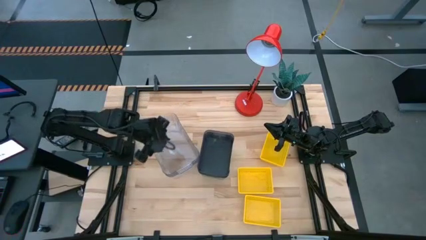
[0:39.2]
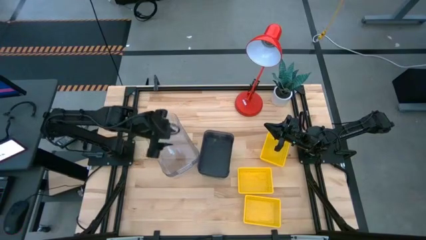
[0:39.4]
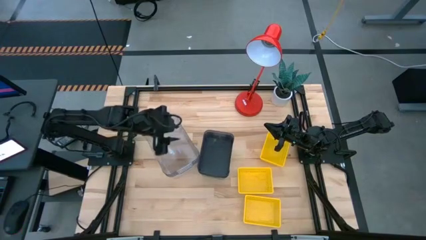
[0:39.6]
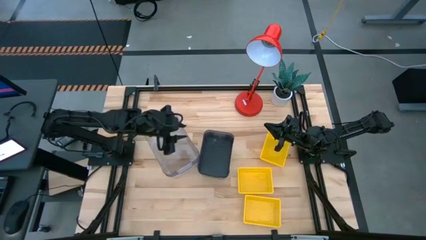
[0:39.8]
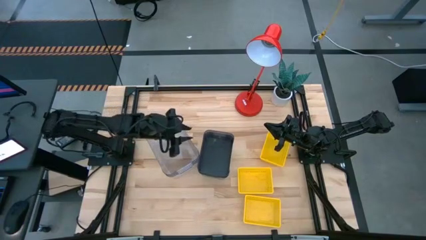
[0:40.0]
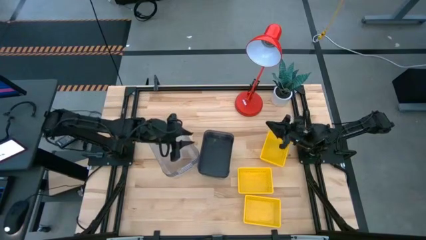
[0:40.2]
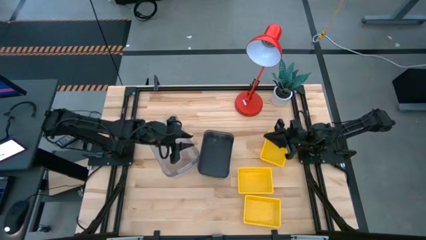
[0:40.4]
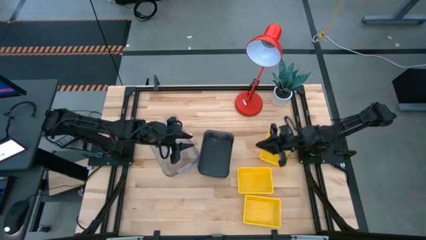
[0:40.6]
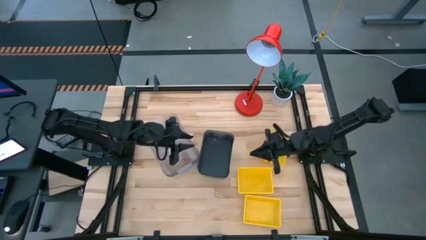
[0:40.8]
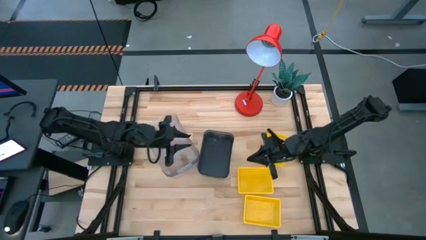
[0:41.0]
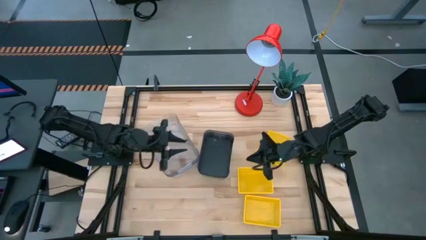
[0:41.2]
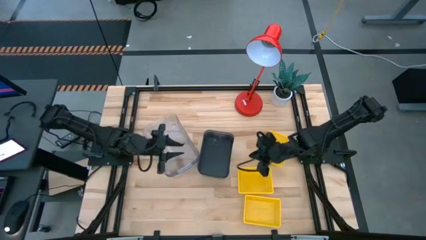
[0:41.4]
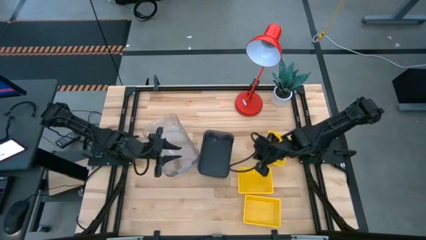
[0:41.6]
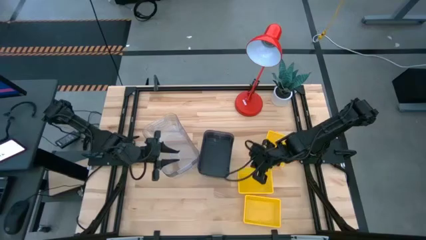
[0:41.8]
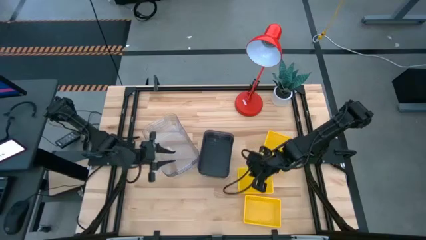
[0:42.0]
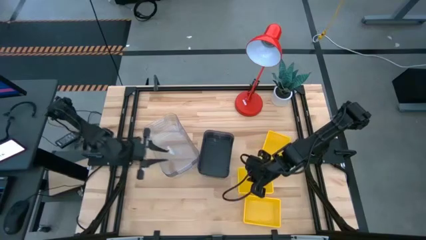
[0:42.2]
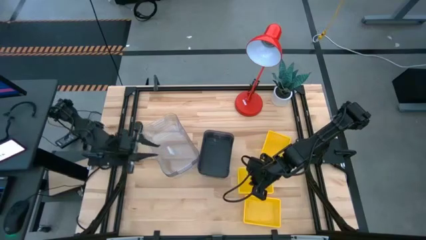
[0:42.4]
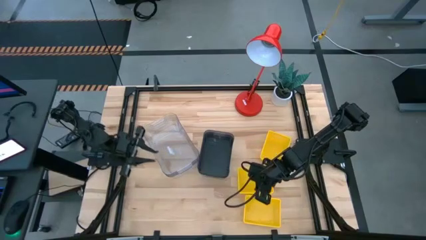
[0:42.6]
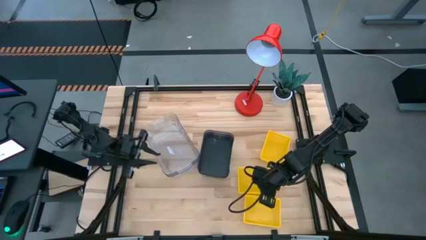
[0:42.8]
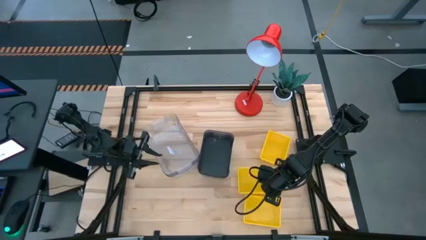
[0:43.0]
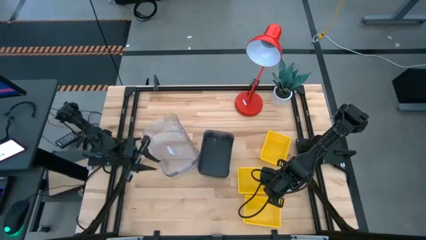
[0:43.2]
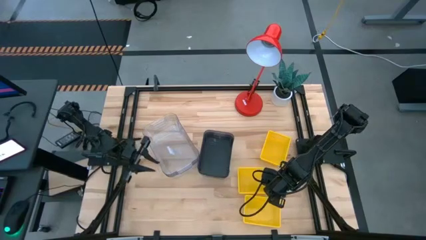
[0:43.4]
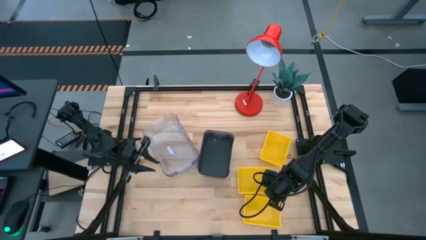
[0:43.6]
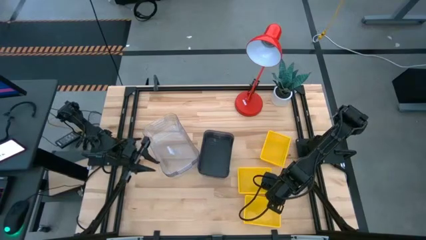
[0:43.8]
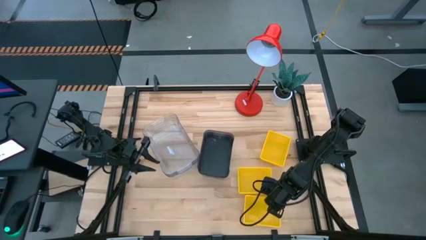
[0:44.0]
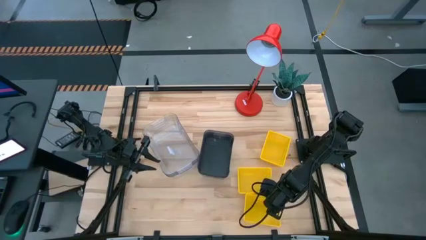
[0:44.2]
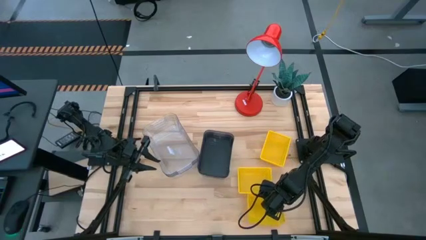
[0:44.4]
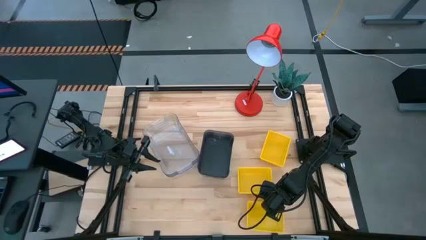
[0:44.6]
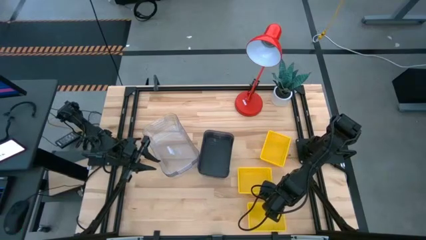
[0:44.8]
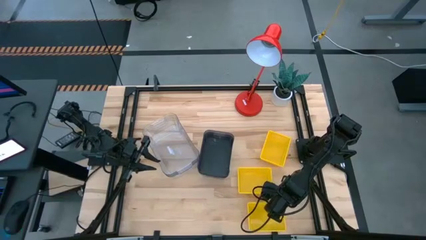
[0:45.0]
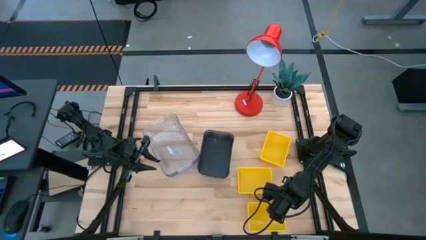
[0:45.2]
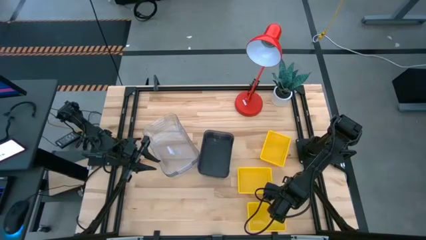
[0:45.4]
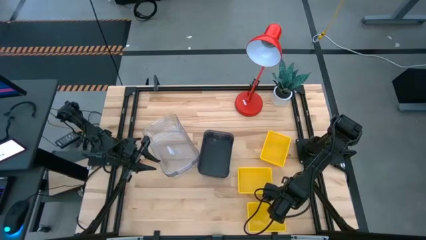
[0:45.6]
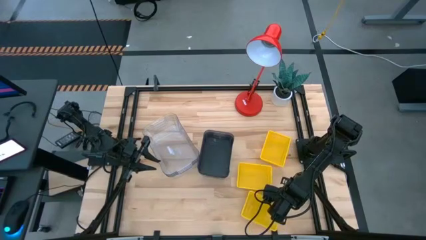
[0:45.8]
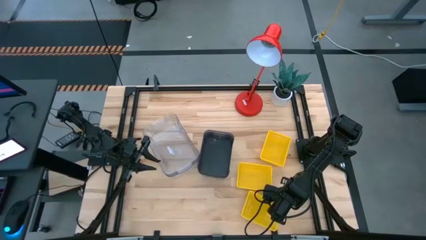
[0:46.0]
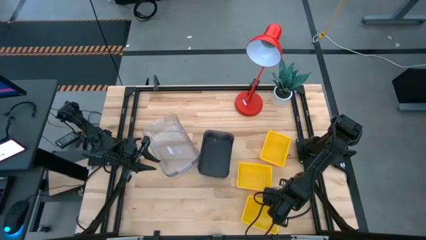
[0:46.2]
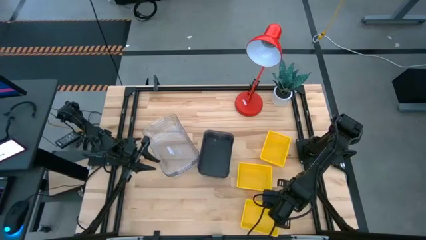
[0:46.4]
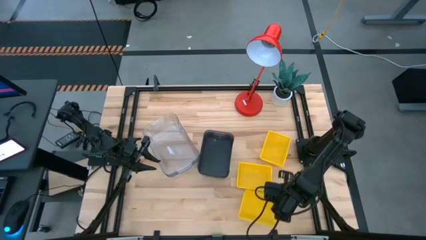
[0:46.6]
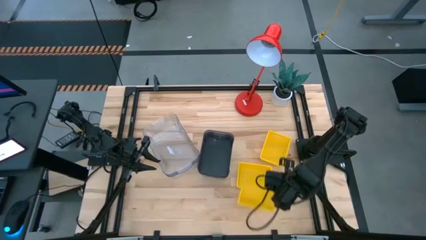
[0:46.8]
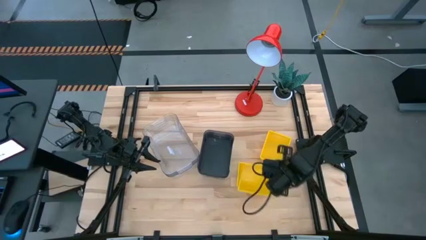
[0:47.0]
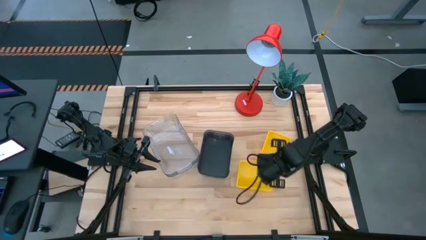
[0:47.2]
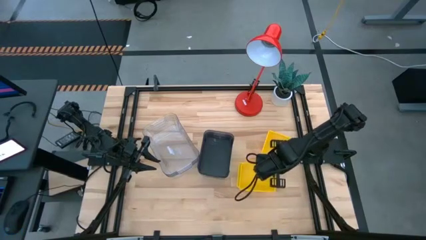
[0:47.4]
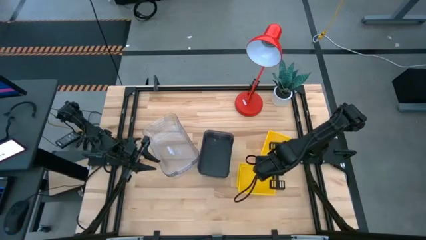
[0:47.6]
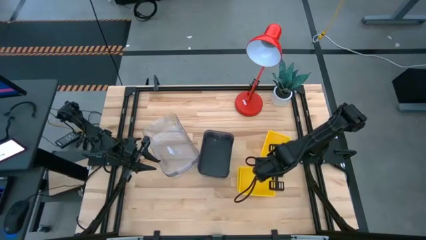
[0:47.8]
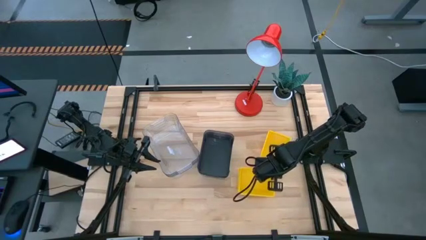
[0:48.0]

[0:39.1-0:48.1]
Stack the bottom yellow bin on the center yellow bin

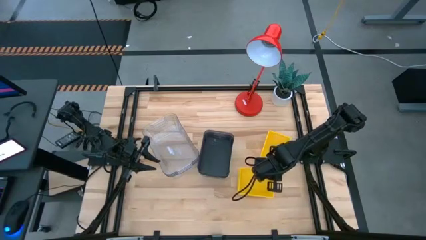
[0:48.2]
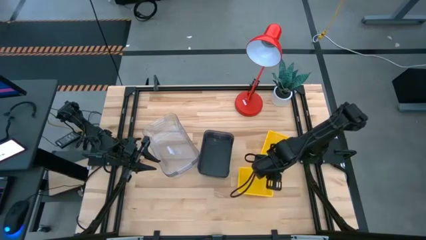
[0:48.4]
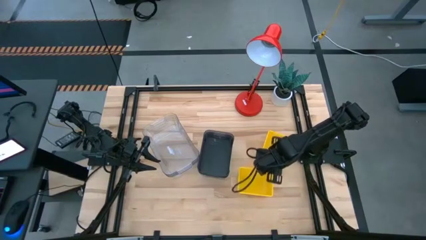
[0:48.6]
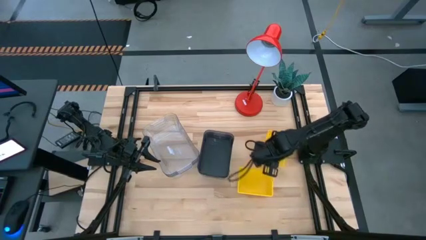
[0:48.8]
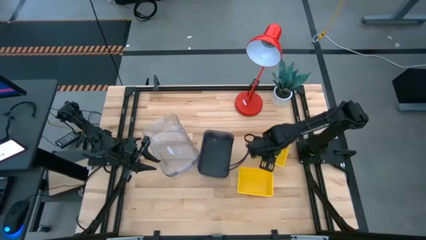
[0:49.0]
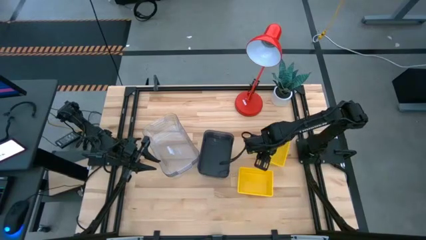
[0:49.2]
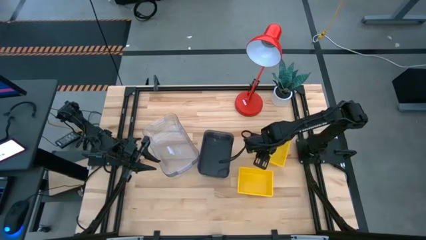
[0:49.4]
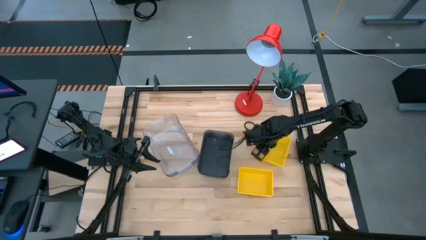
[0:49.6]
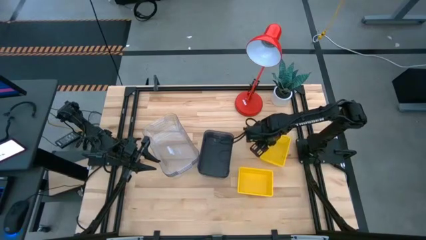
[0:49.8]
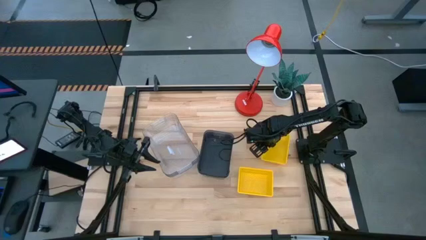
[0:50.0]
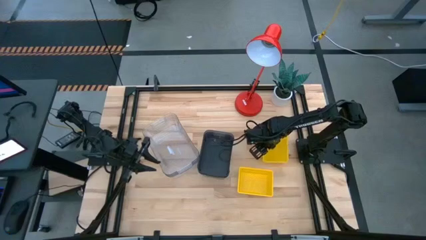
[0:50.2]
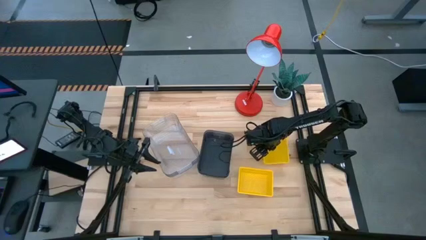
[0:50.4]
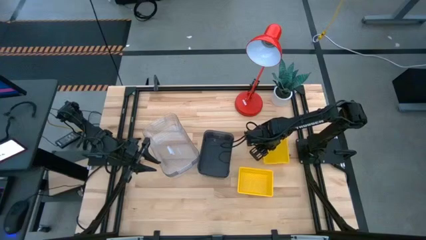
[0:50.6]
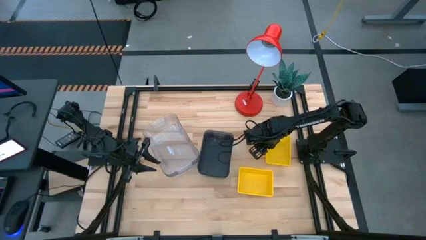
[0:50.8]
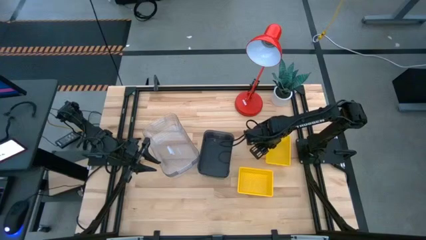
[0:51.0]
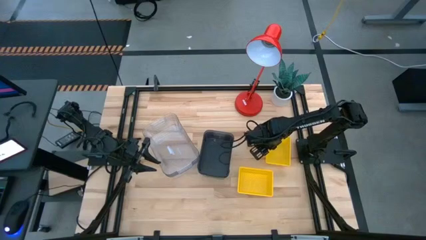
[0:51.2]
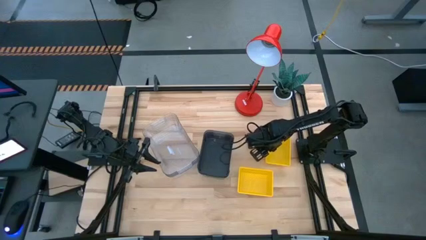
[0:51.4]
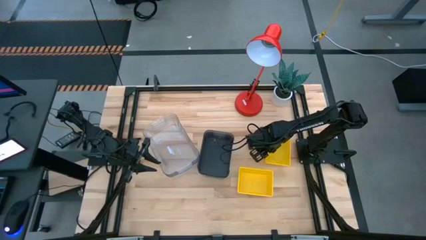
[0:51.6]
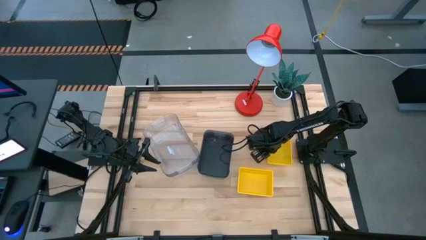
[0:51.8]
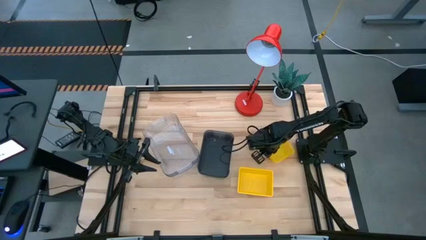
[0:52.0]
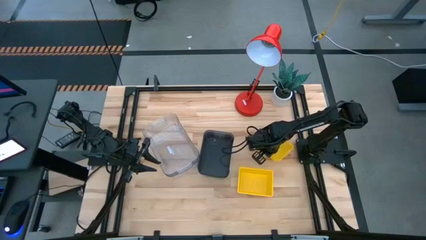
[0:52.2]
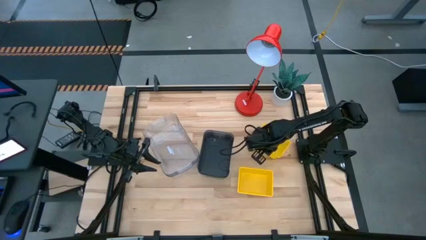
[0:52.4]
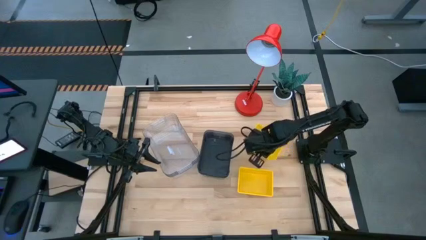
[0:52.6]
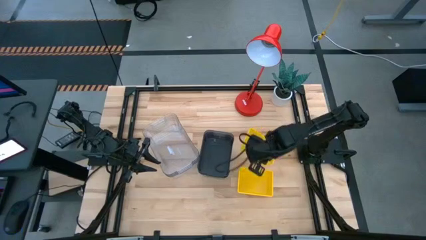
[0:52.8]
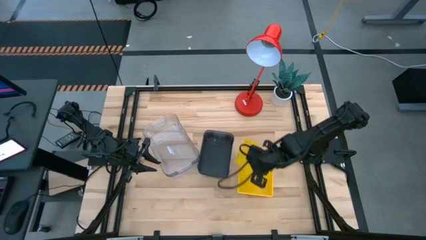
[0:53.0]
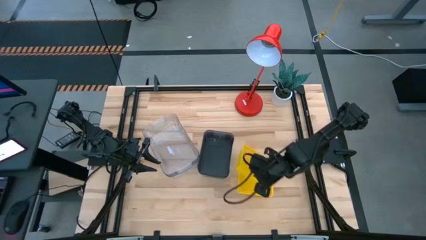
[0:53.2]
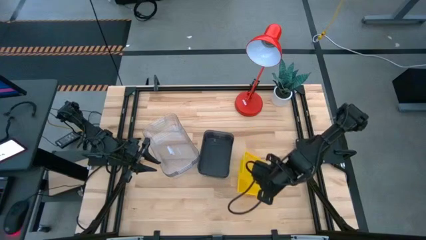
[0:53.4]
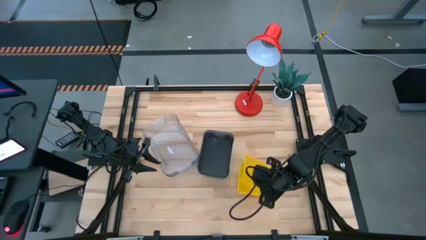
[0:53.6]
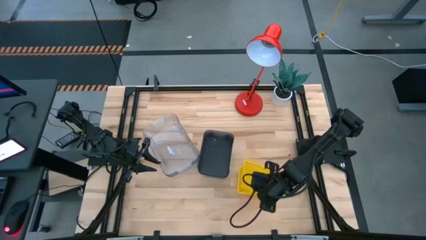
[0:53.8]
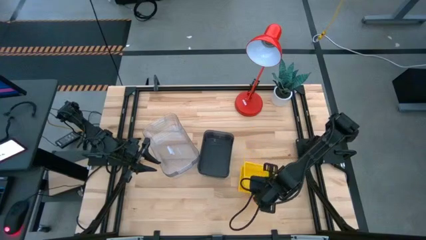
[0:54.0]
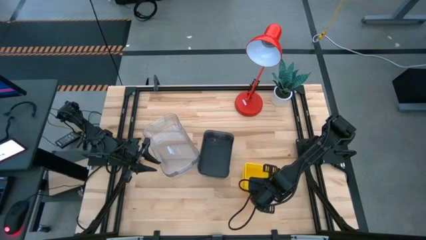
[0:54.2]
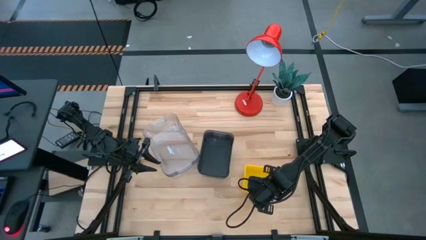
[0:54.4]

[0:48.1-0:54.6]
Stack the top yellow bin on the yellow bins
